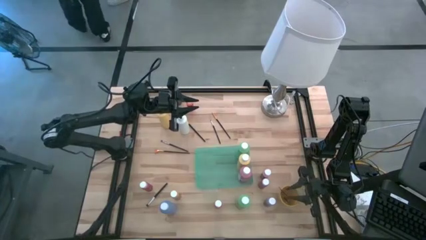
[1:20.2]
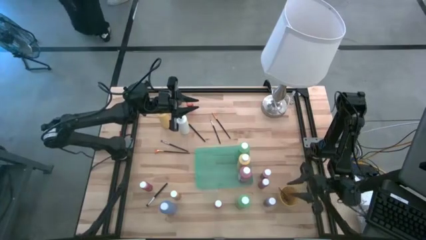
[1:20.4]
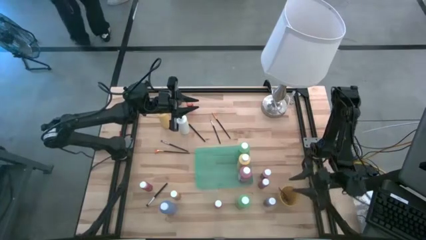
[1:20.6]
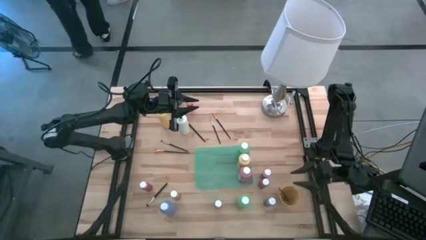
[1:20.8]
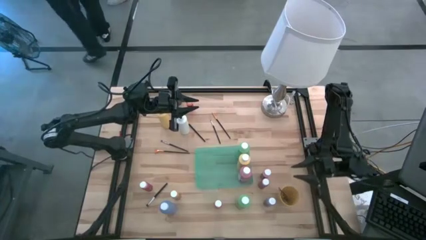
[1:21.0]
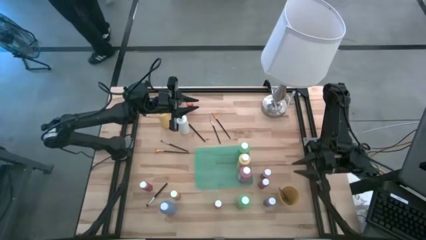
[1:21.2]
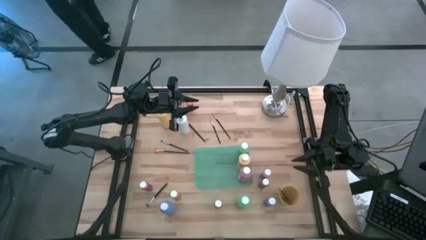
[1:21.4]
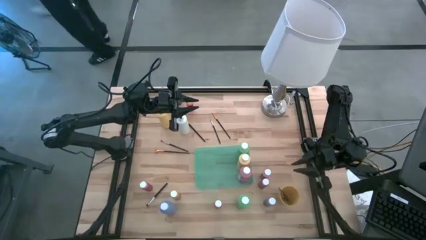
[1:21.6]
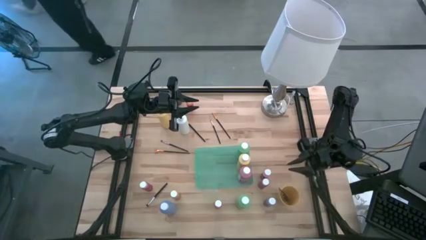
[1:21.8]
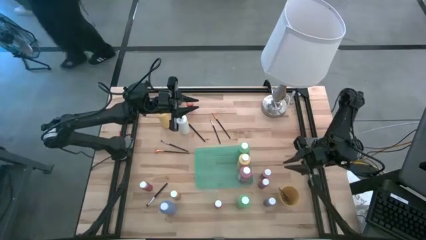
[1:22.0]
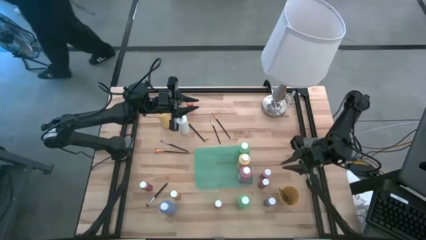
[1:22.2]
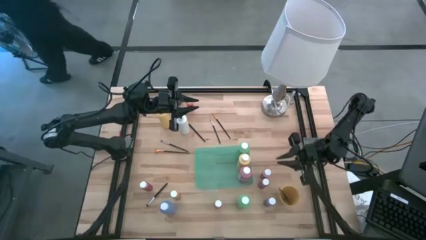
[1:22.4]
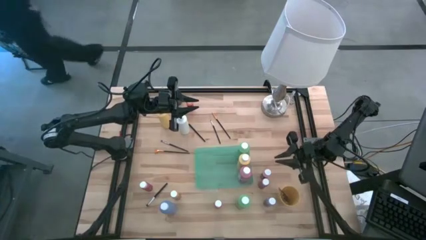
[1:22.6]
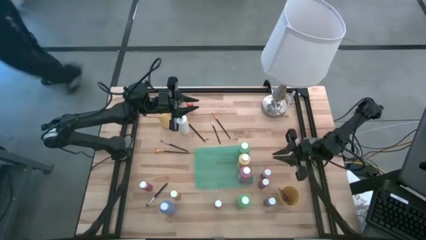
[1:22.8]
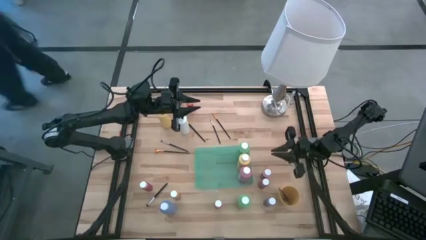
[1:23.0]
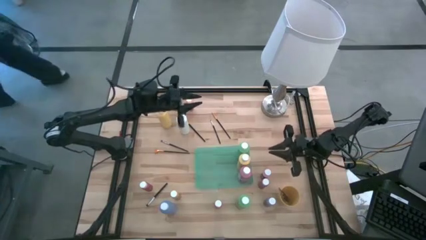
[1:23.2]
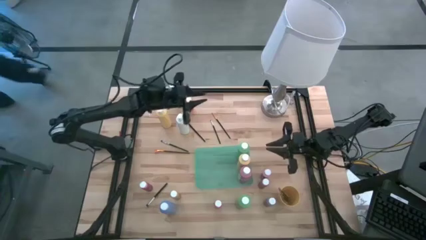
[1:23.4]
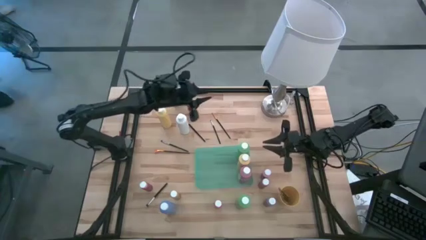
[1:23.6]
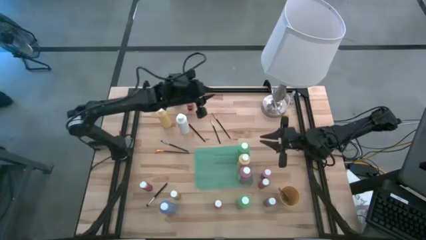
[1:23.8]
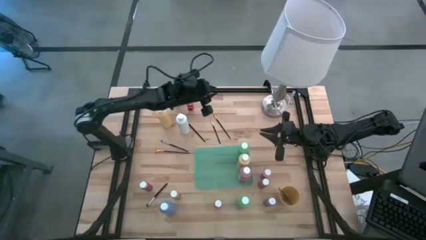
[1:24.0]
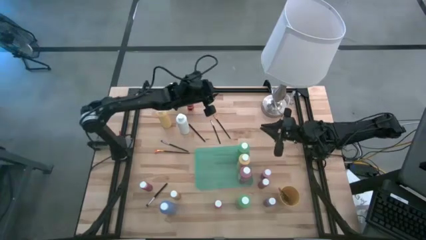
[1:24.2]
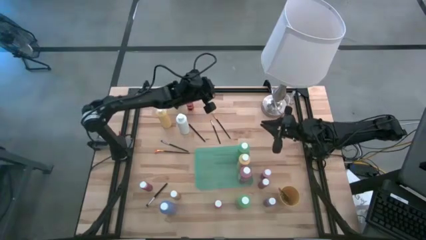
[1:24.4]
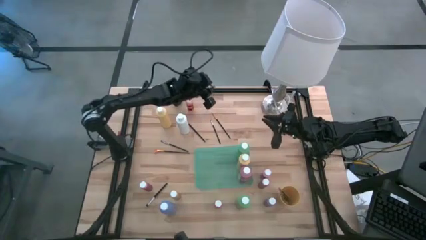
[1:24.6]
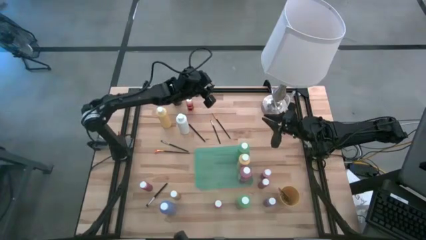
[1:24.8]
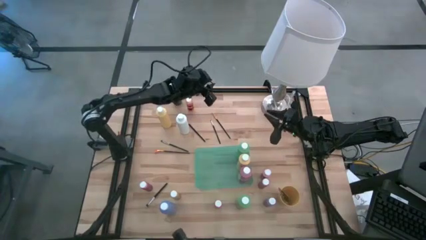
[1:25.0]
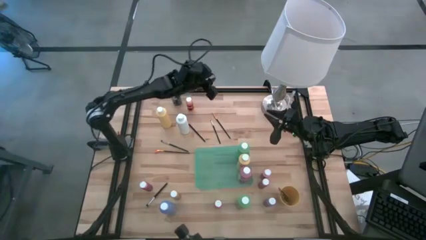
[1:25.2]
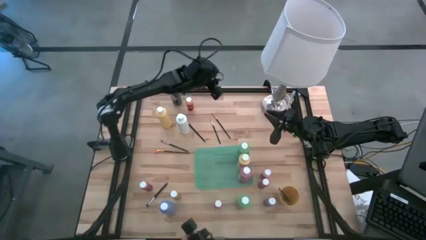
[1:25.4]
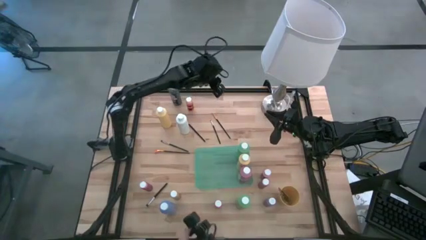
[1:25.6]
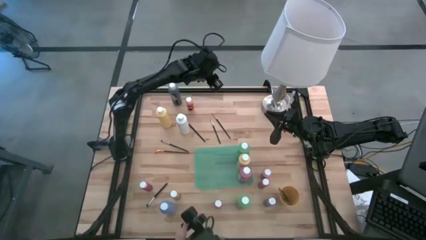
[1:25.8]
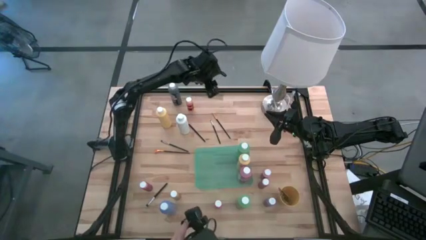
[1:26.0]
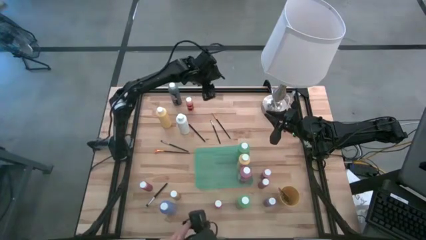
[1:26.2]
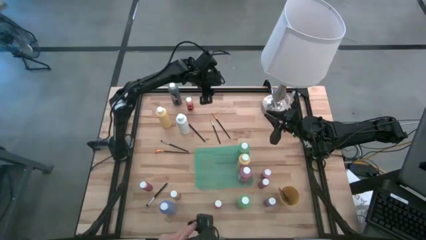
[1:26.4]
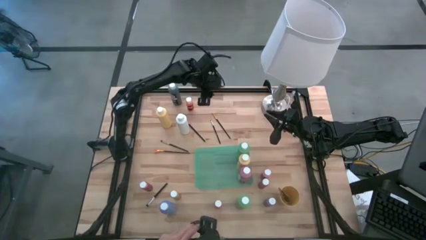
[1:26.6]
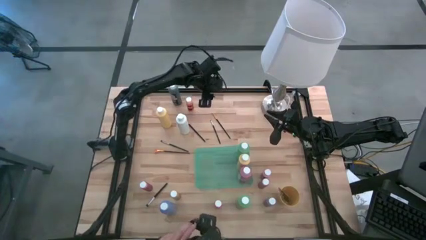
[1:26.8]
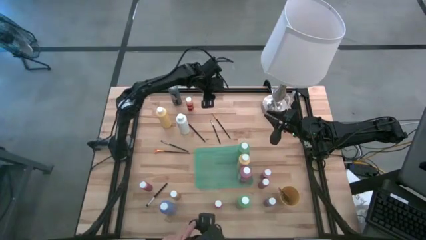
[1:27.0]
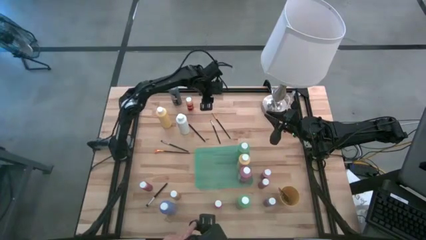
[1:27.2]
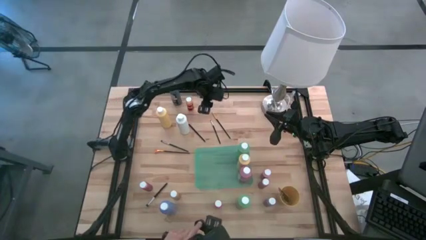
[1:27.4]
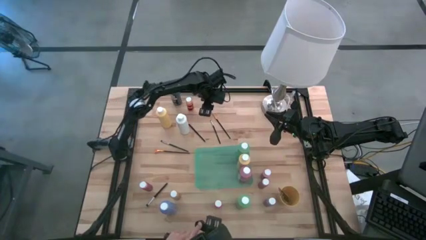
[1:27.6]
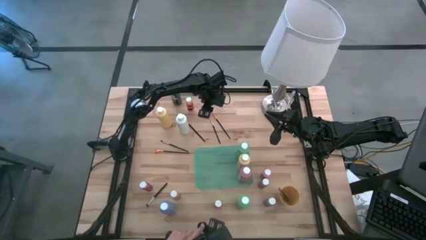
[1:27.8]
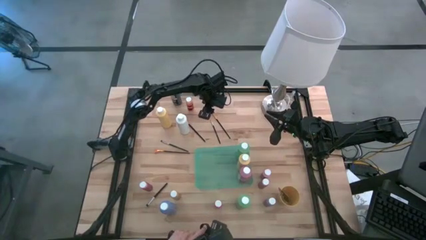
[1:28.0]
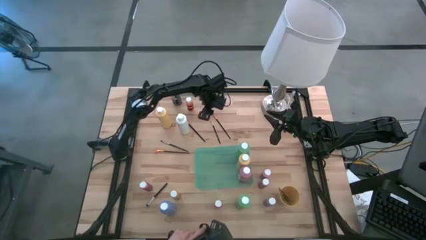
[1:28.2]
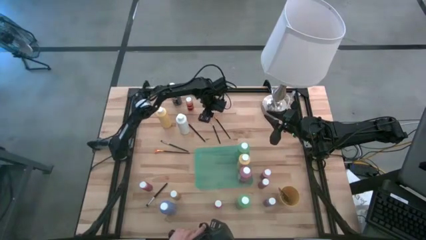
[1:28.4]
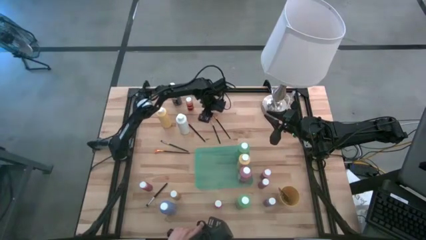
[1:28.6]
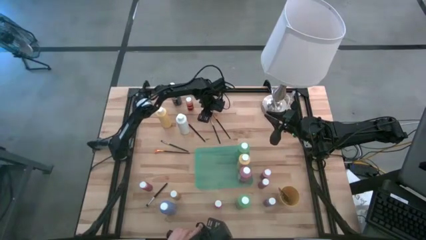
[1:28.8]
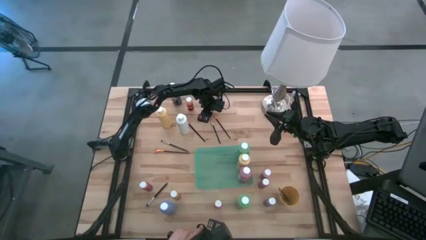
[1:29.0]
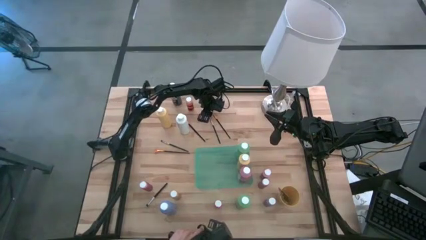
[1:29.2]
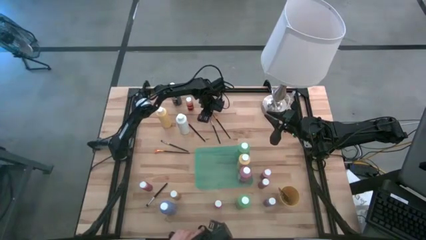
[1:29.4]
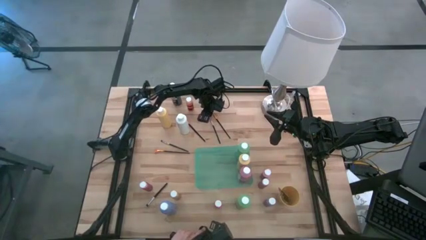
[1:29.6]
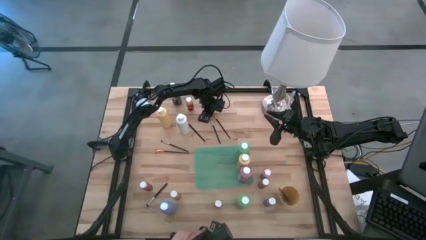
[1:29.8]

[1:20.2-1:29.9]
Task: Pick & Place Paint Supplies
Put the gold paintbrush into the yellow cup

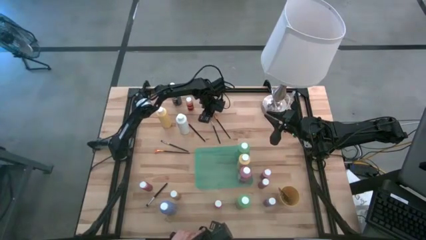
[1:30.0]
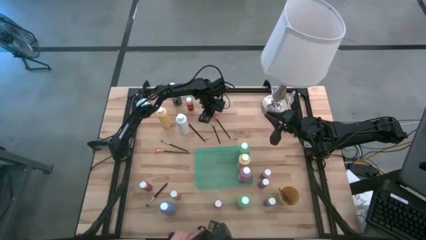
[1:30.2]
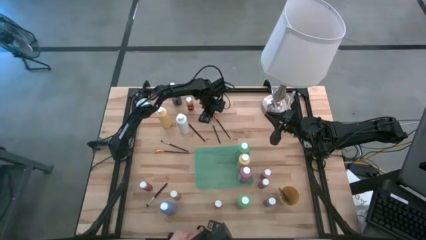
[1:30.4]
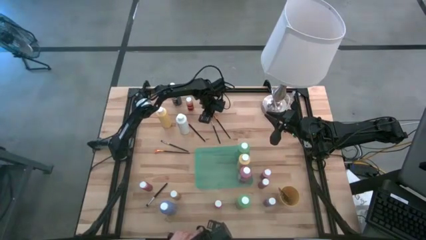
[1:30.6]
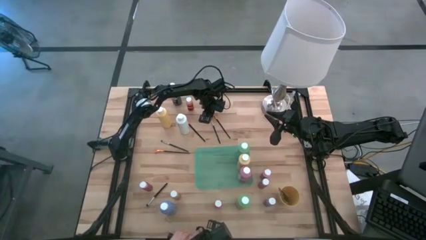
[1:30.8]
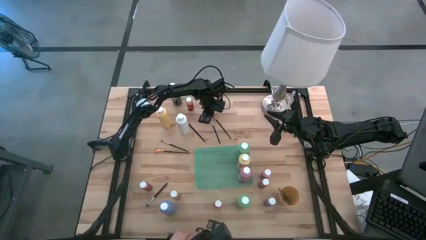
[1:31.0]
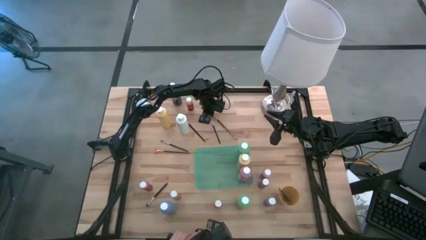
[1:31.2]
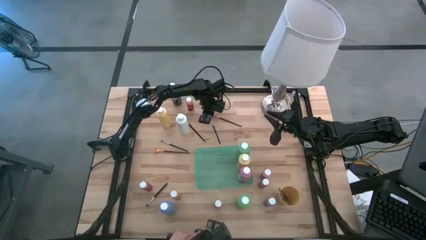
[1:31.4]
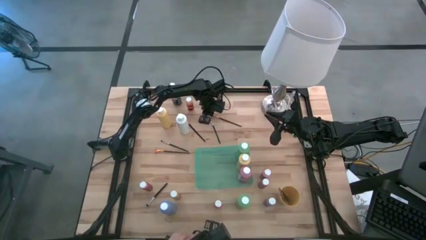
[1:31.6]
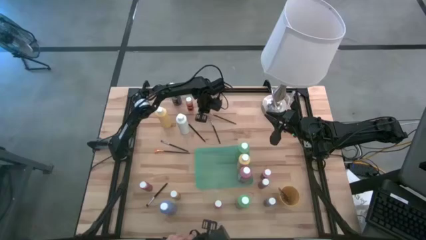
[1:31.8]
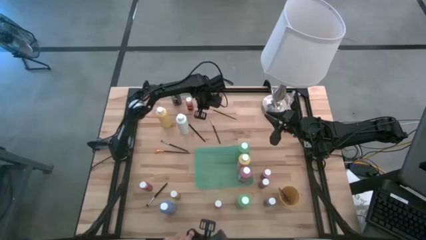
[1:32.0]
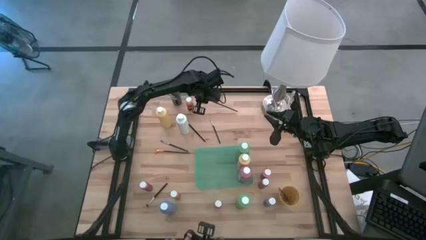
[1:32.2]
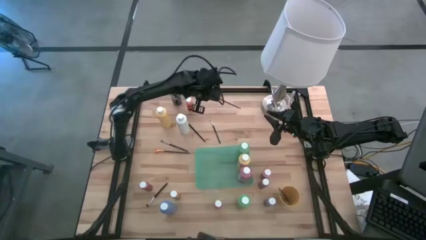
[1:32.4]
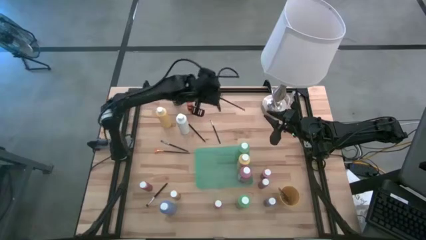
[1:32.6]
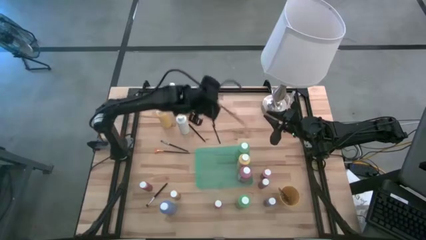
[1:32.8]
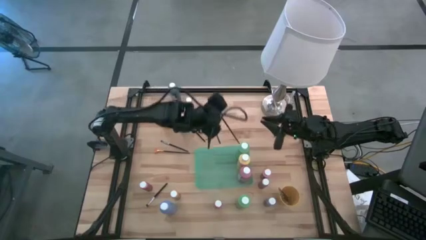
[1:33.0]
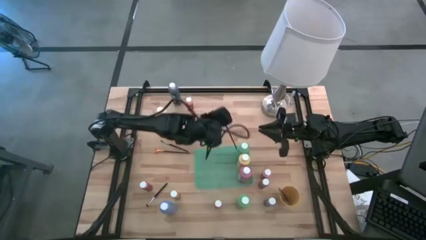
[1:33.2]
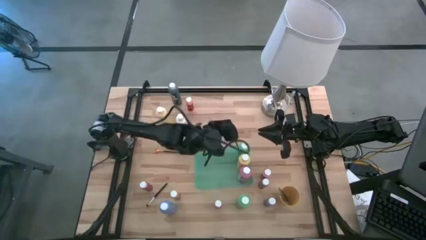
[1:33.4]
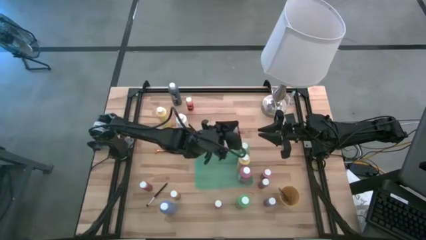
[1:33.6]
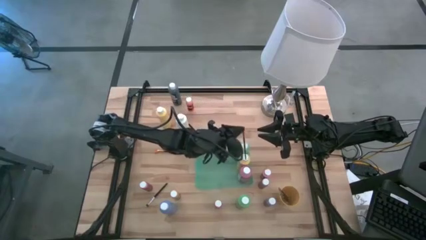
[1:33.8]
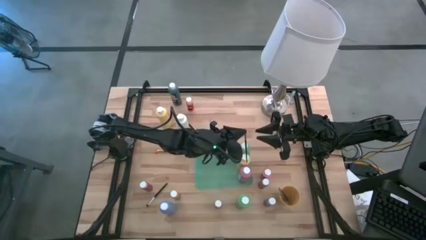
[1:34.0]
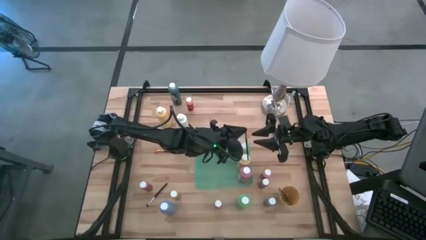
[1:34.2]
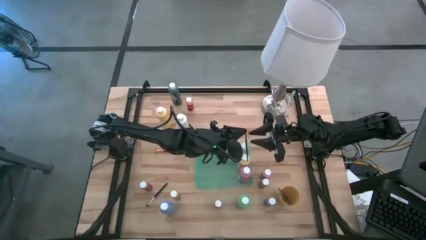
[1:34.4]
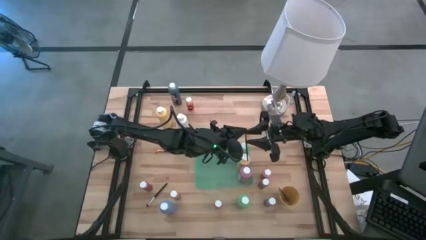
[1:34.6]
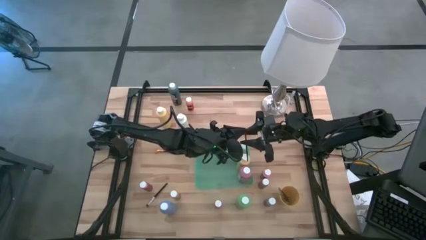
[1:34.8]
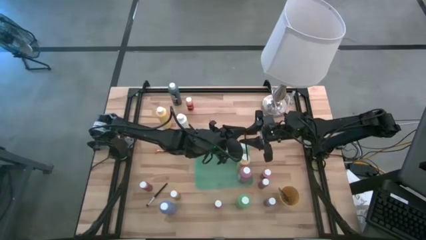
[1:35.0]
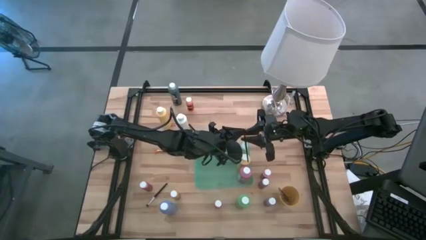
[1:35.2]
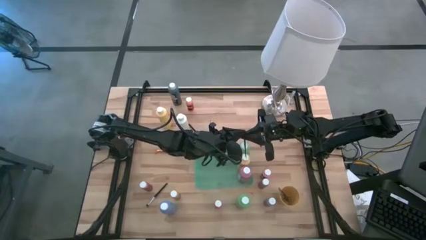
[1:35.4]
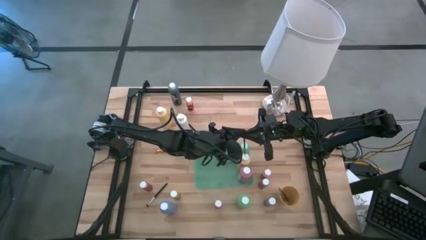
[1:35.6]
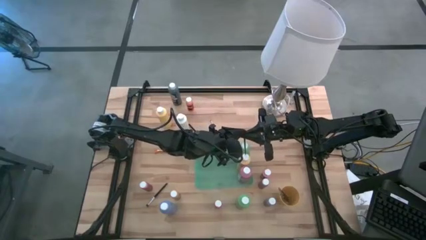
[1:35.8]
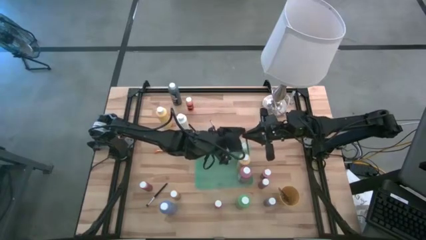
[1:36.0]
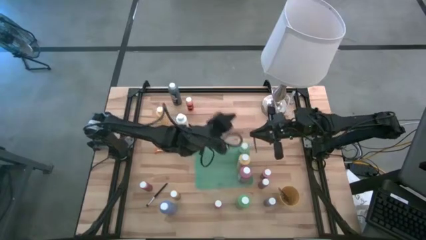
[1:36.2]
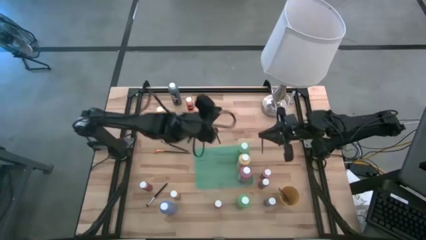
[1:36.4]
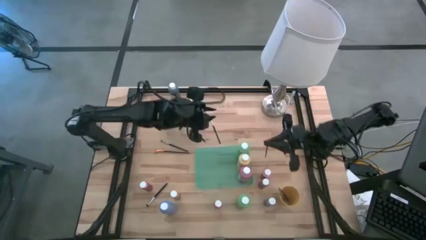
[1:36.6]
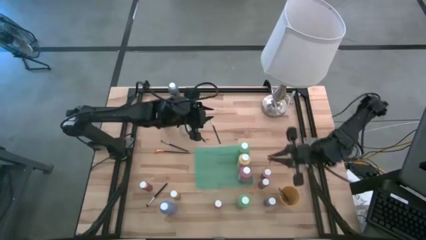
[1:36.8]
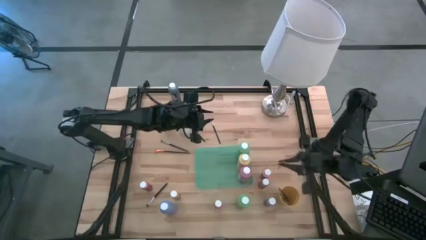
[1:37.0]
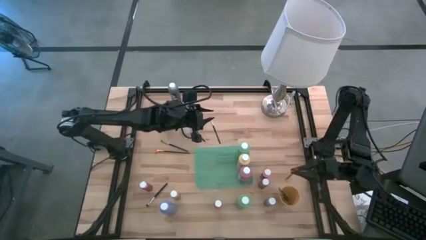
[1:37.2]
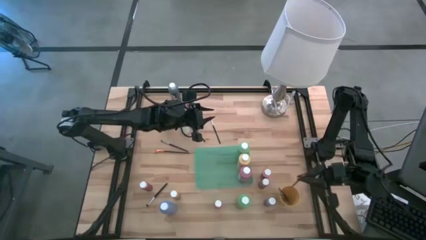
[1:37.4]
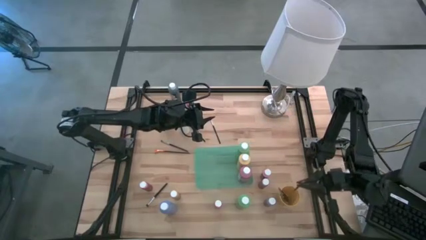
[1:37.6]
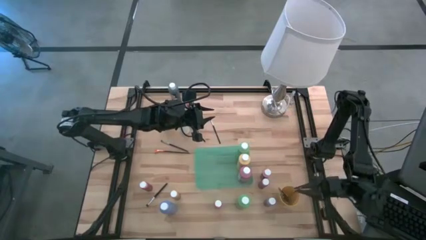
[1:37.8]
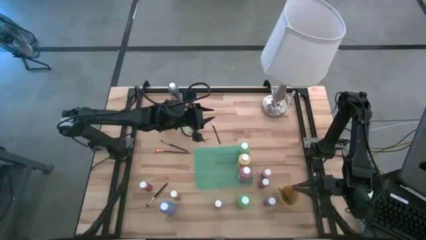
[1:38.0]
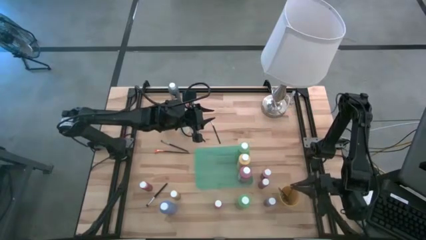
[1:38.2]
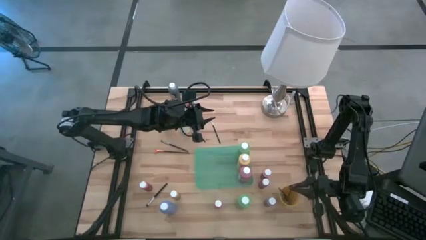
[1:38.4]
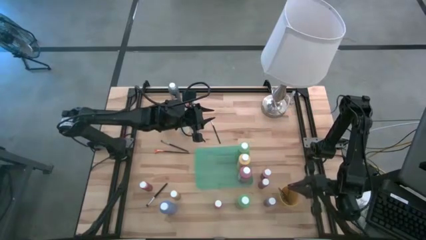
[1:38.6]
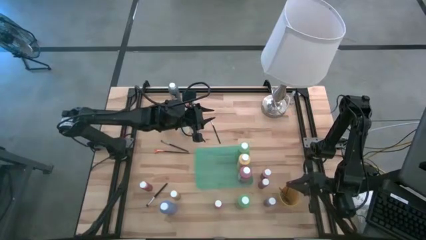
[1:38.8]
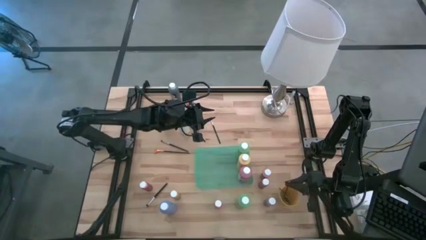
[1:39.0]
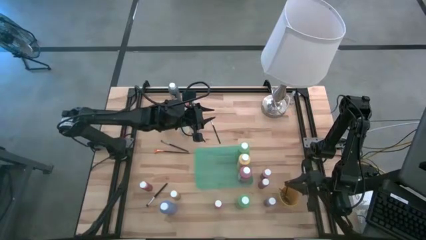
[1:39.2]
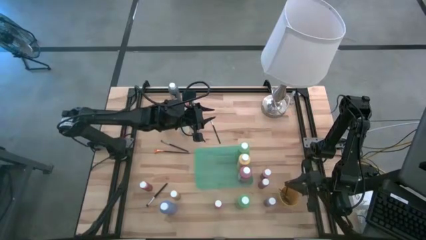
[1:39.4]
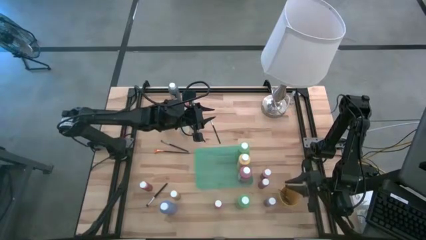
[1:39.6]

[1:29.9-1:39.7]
Put the gold paintbrush into the yellow cup
